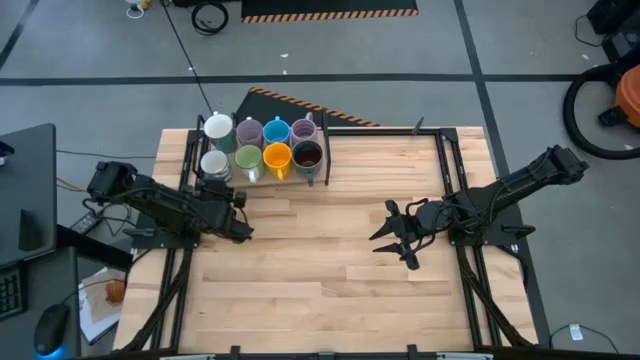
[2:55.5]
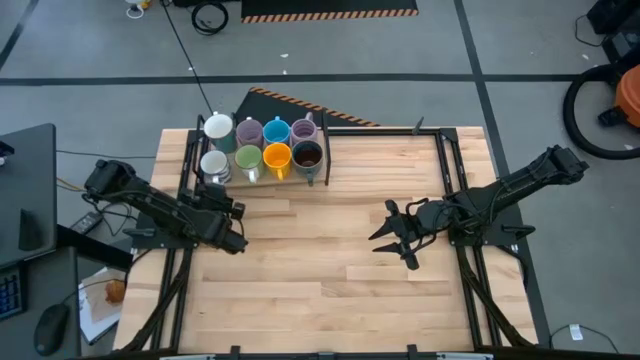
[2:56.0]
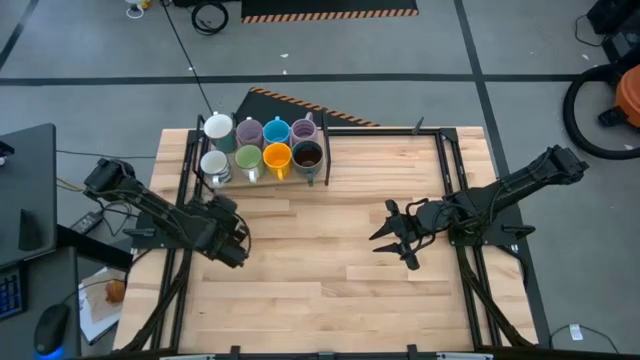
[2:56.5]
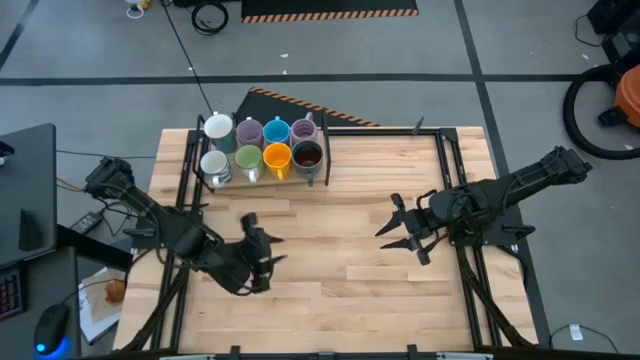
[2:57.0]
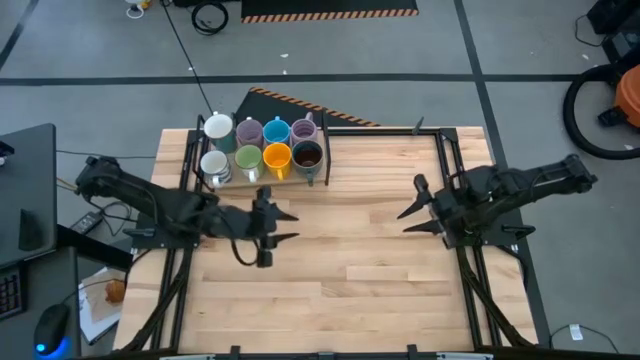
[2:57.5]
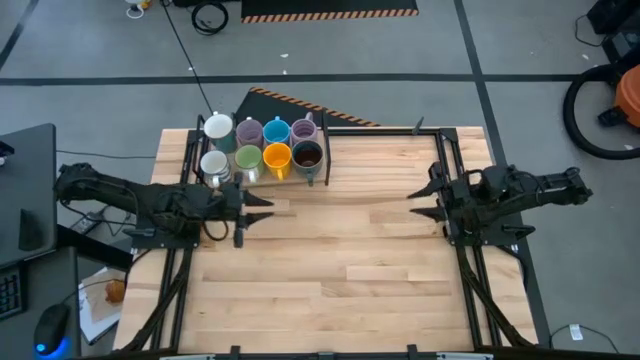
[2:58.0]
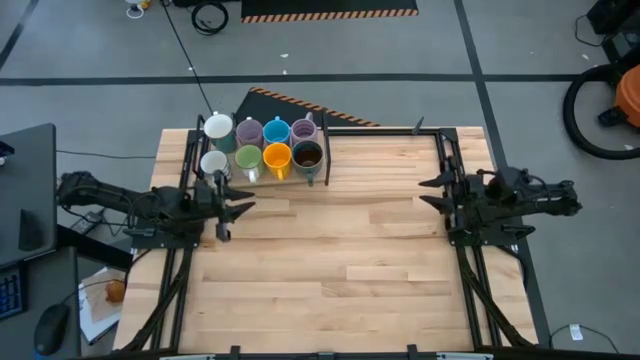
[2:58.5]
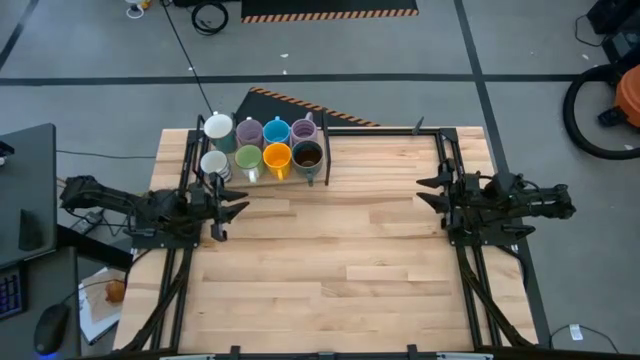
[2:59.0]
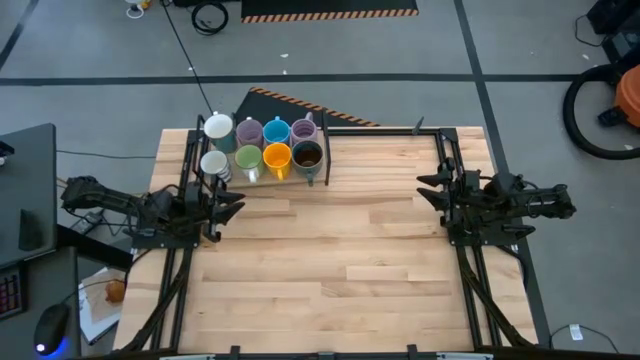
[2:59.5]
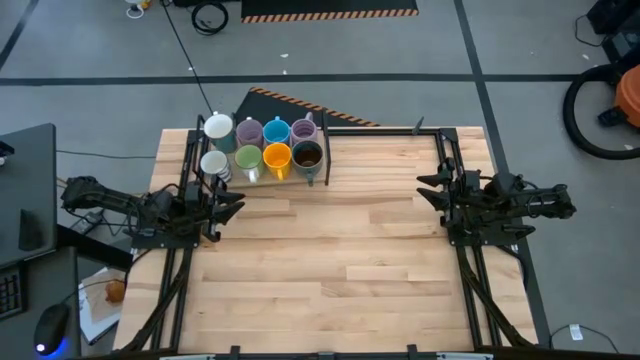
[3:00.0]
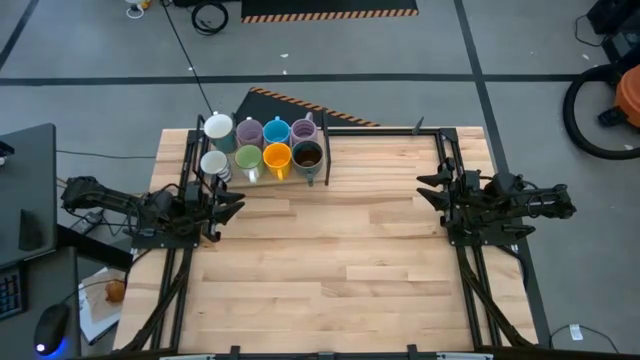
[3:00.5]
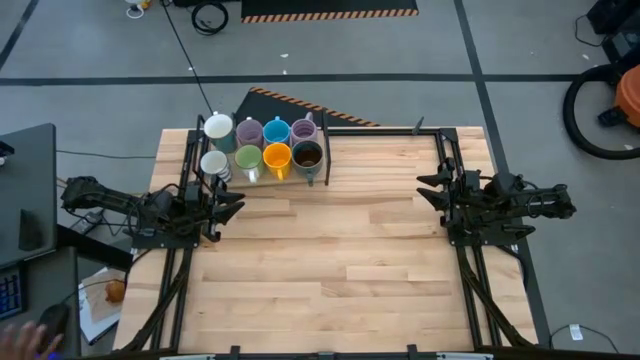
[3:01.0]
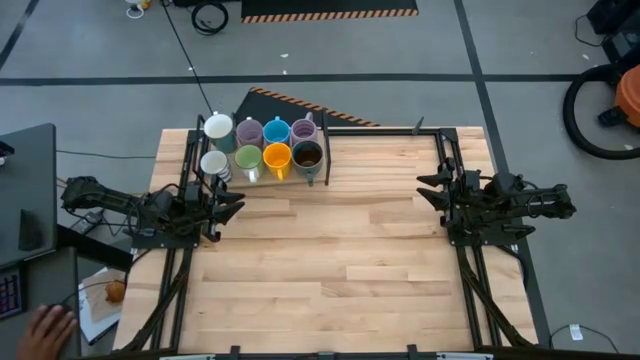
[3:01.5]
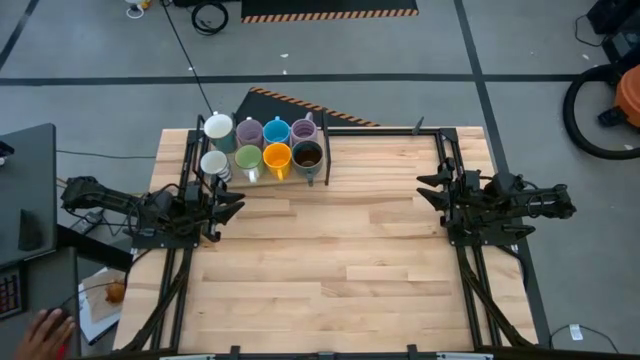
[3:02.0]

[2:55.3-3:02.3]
Task: Place coffee mugs
Return to Home Position

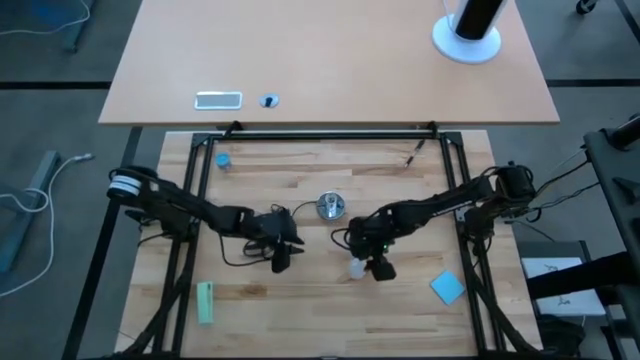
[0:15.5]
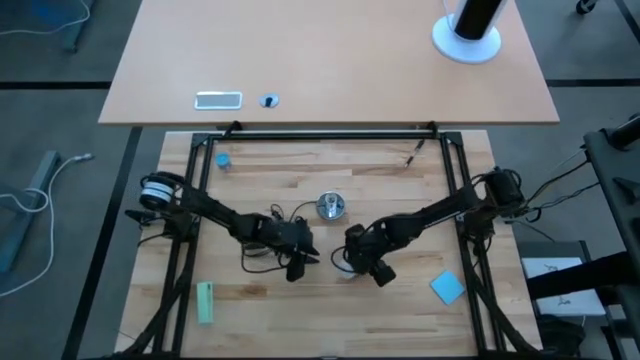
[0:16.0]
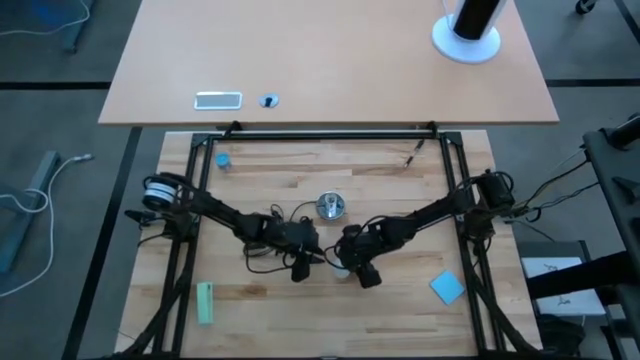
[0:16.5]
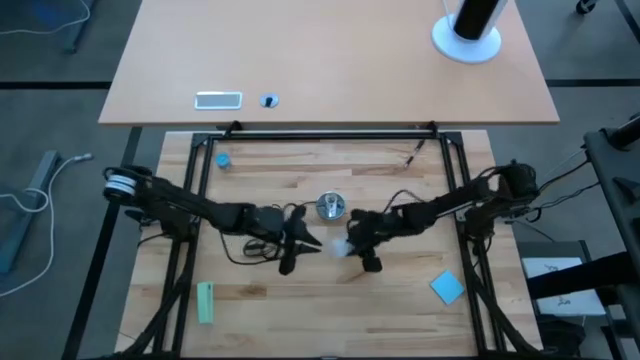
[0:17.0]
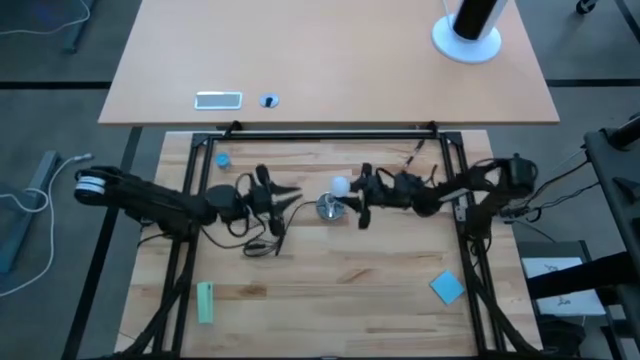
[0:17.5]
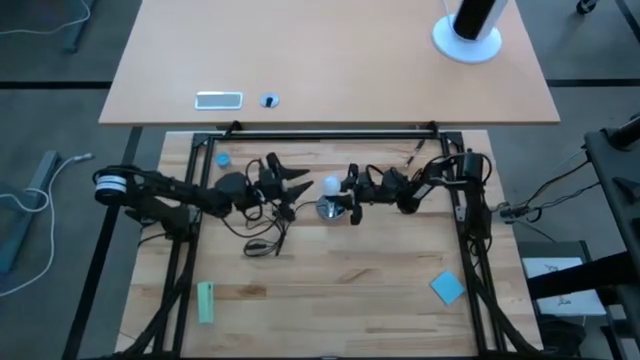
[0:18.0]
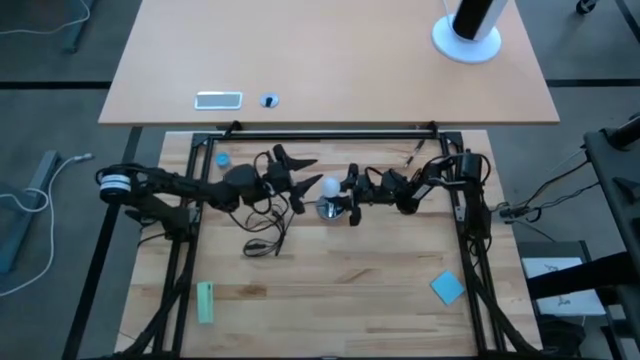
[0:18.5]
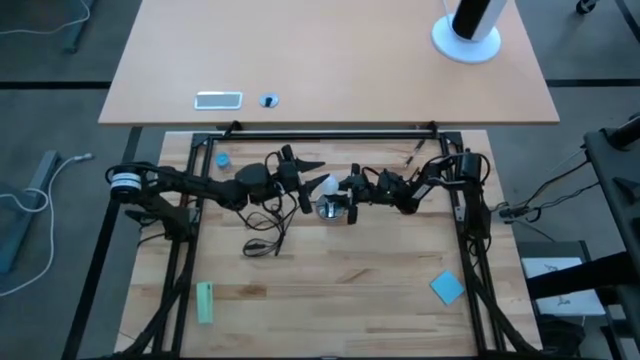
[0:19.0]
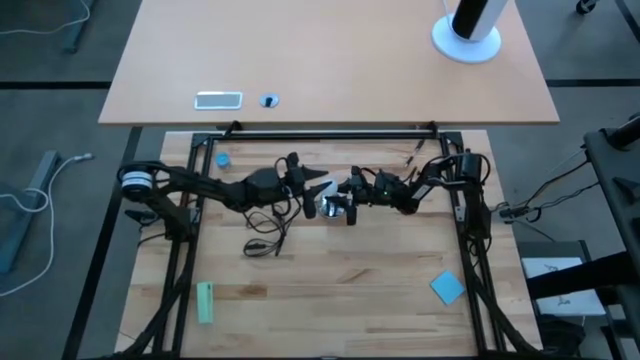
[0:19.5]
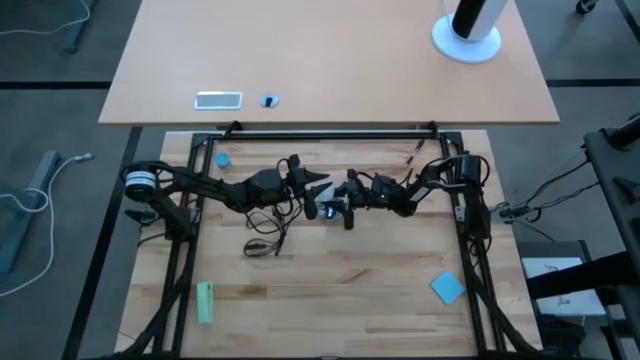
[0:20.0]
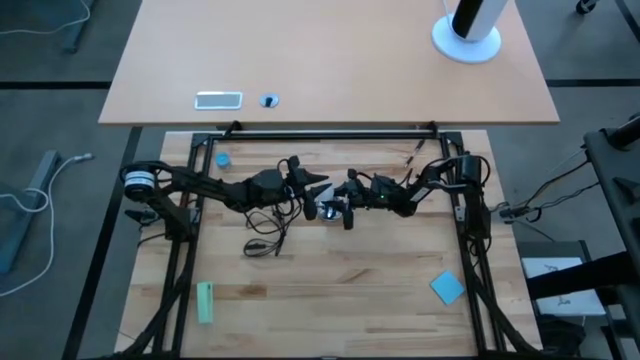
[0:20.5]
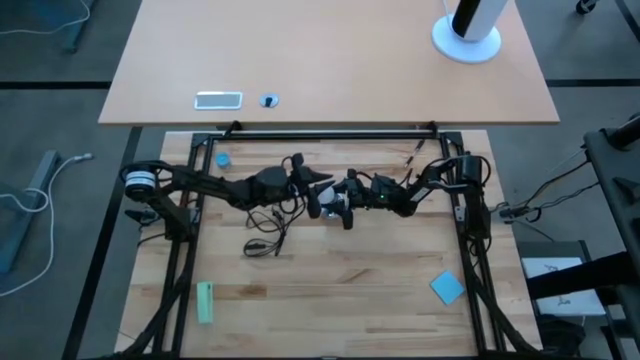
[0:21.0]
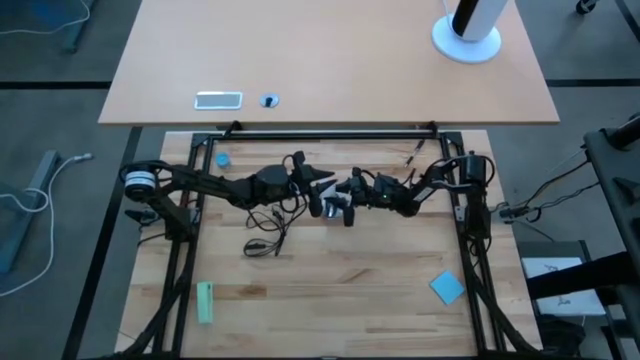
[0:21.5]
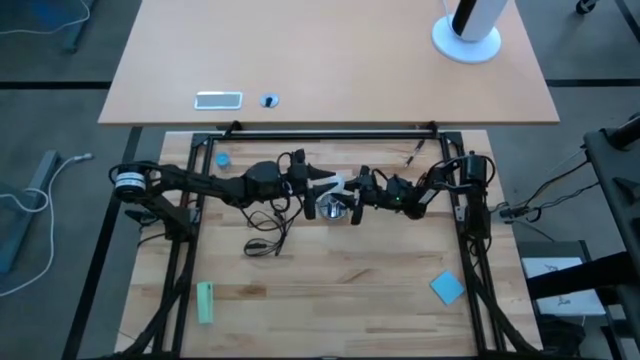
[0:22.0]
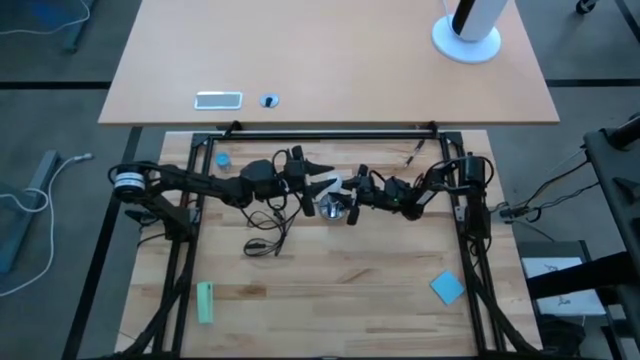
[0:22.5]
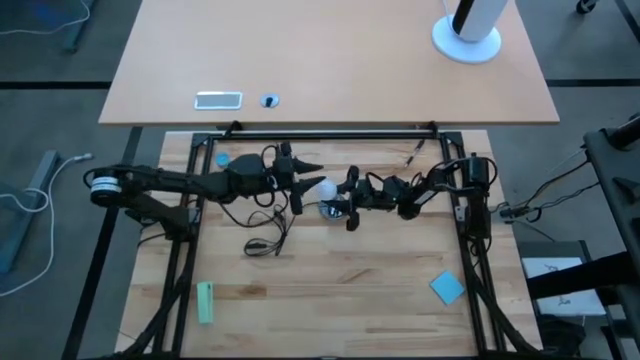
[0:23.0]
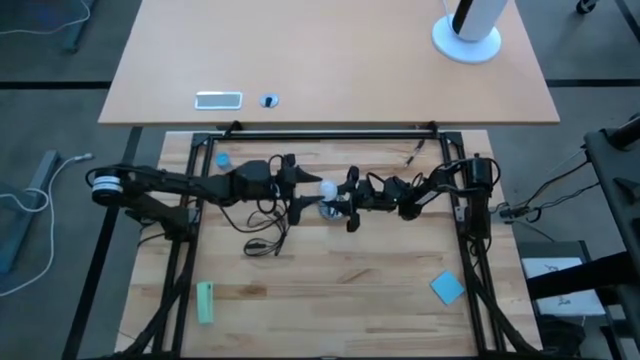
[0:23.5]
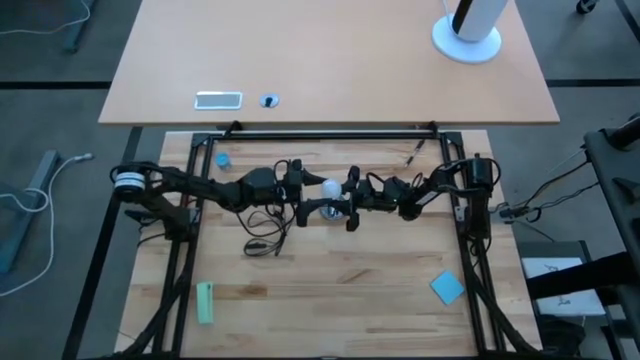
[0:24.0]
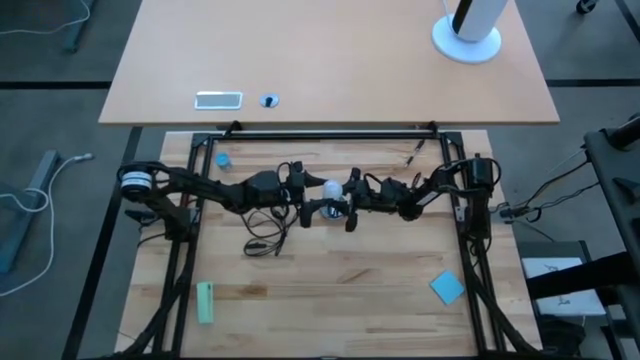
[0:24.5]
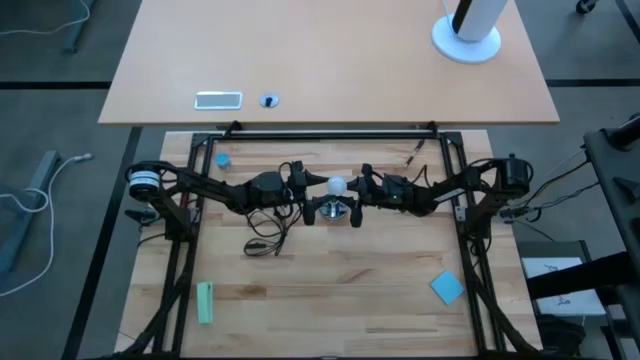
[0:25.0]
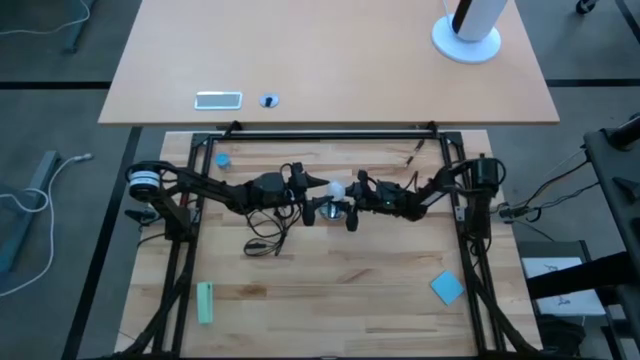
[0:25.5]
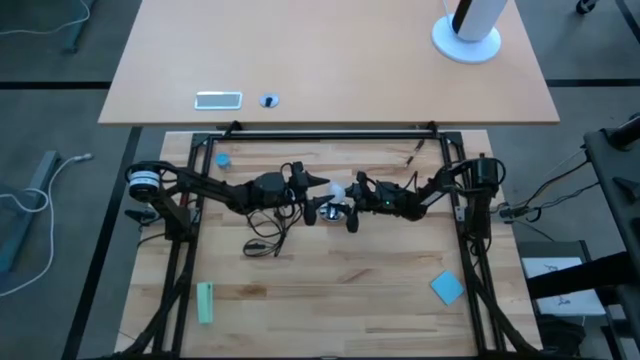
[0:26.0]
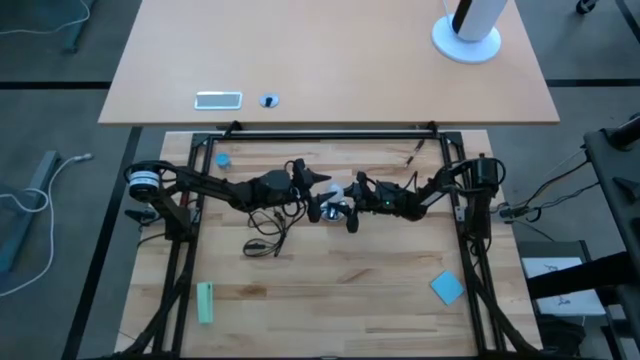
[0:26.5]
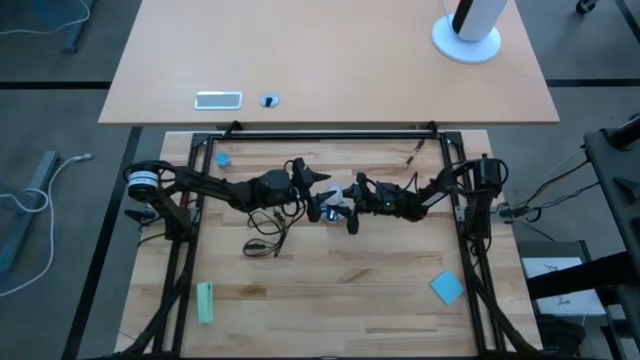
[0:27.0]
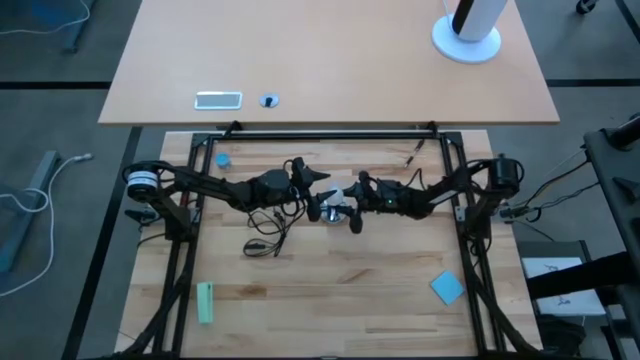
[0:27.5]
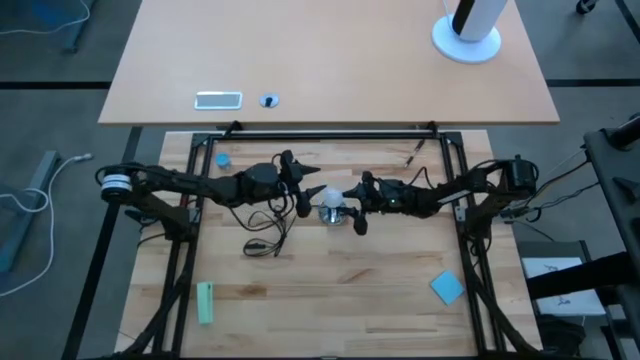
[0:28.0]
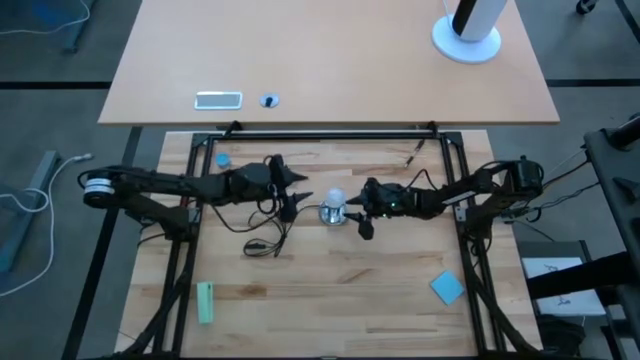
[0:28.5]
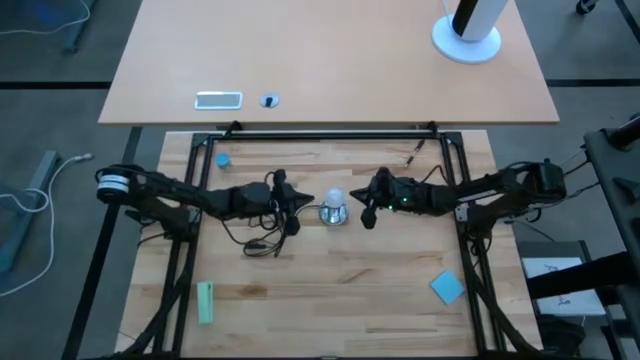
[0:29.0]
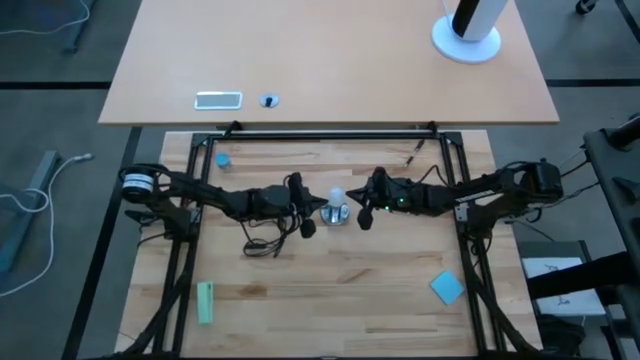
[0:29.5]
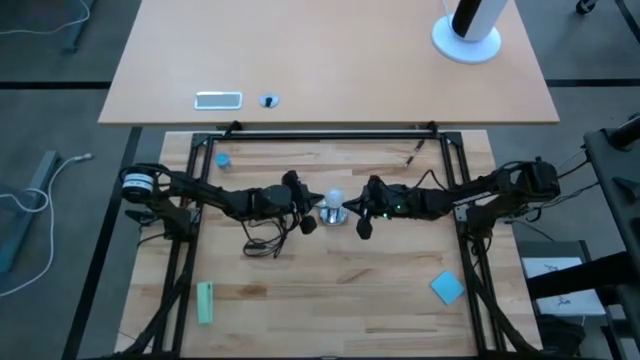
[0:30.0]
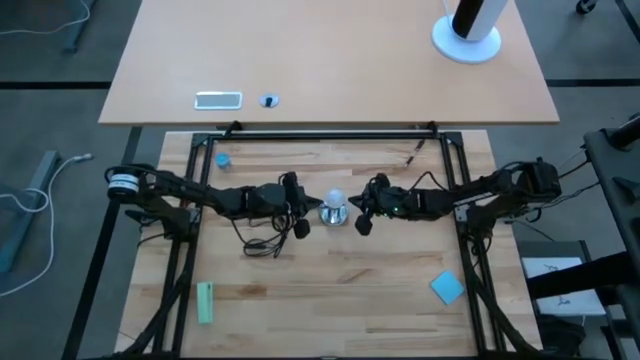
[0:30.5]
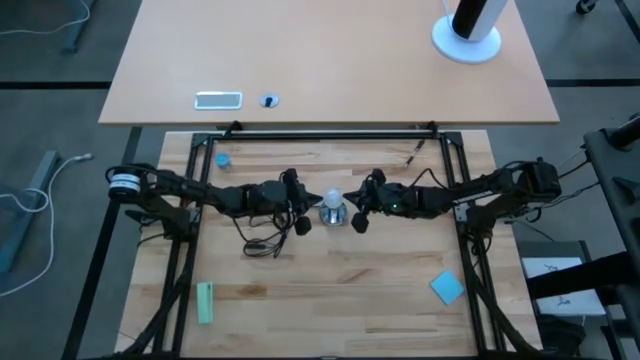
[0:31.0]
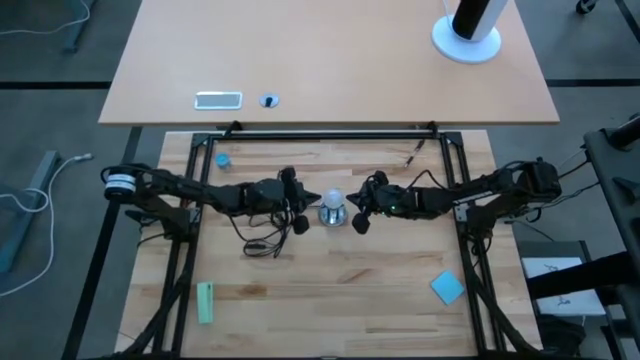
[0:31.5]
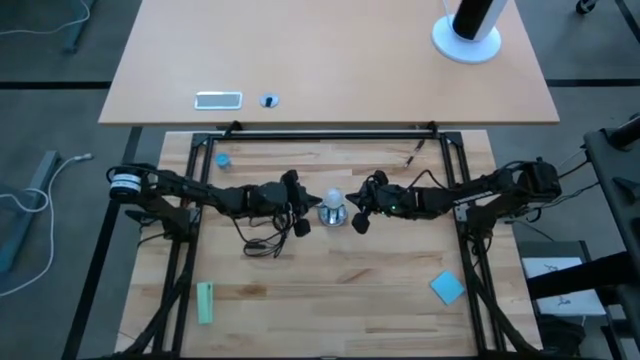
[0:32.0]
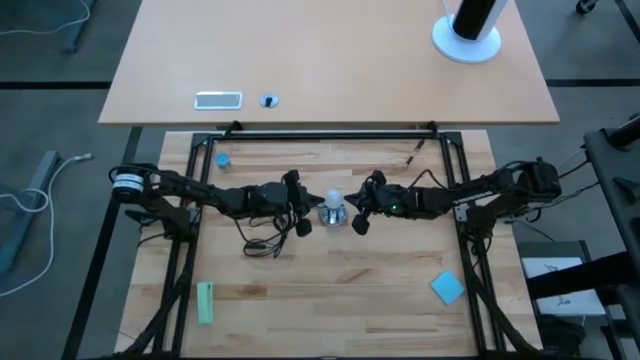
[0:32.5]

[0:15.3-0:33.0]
Task: Screw lightbulb
Insert the white lightbulb into the metal lamp
